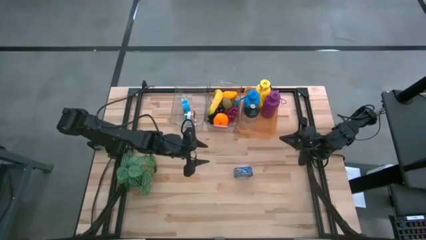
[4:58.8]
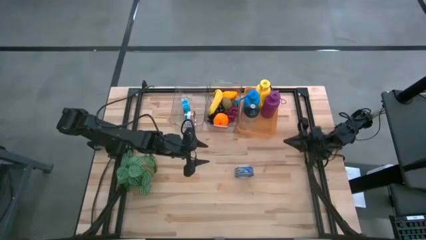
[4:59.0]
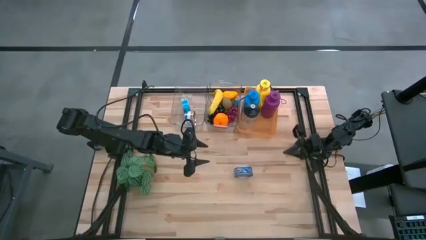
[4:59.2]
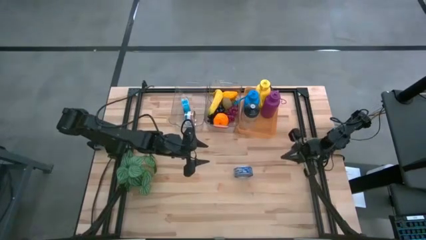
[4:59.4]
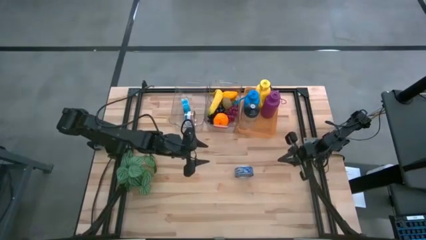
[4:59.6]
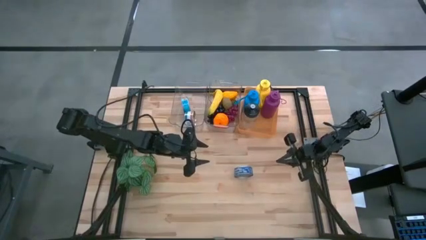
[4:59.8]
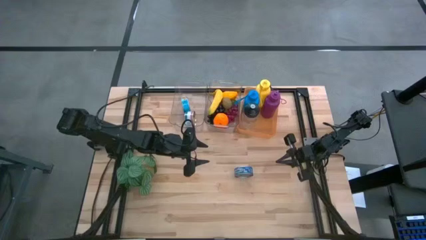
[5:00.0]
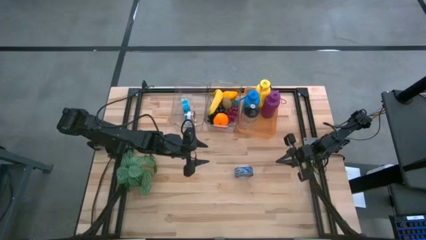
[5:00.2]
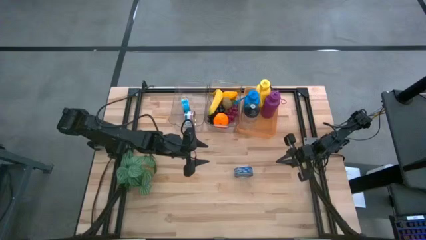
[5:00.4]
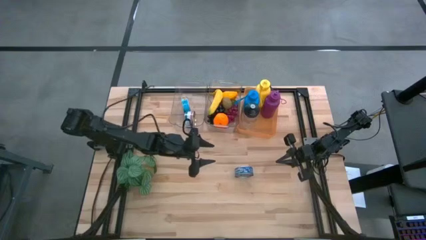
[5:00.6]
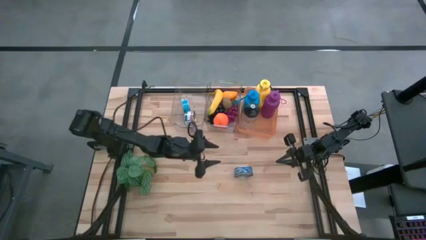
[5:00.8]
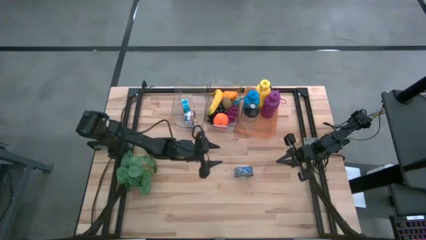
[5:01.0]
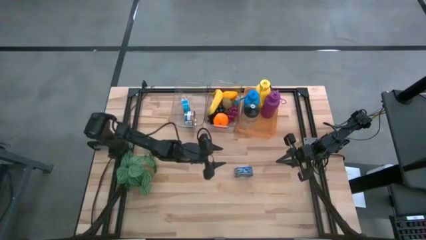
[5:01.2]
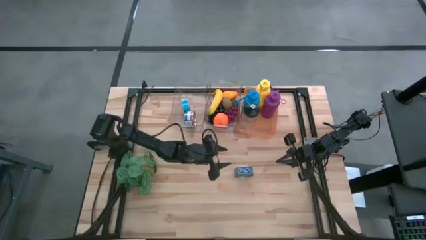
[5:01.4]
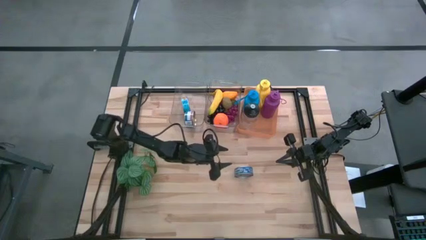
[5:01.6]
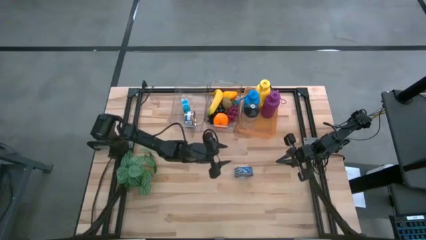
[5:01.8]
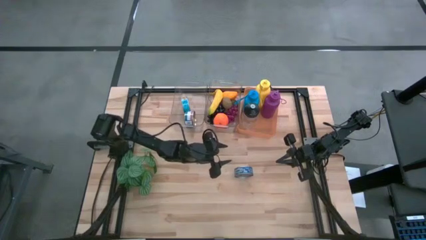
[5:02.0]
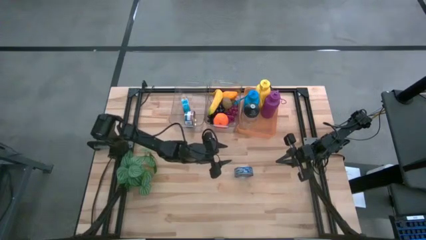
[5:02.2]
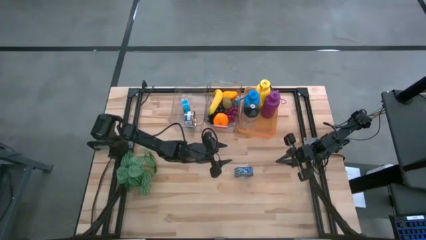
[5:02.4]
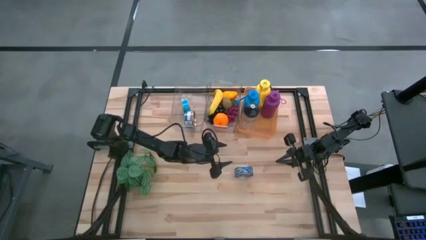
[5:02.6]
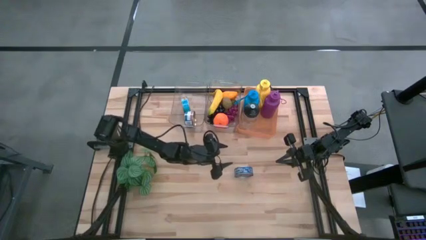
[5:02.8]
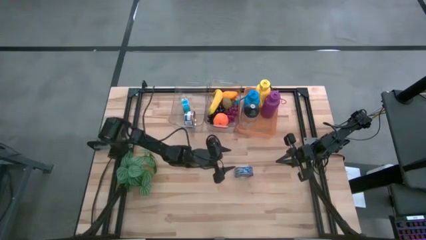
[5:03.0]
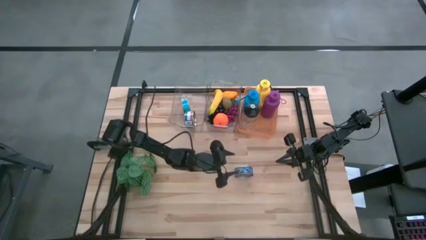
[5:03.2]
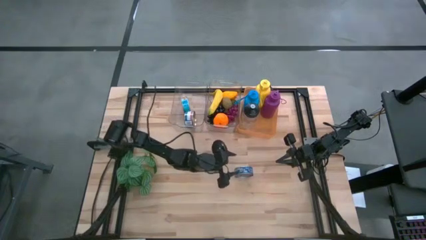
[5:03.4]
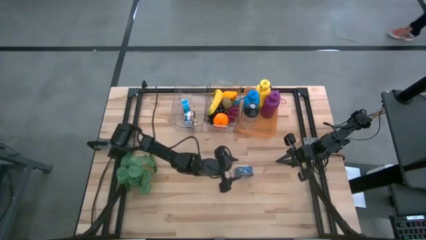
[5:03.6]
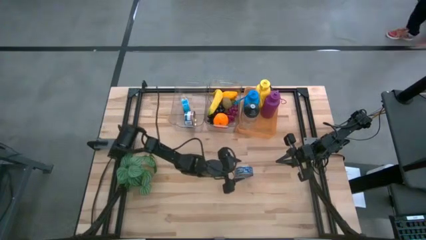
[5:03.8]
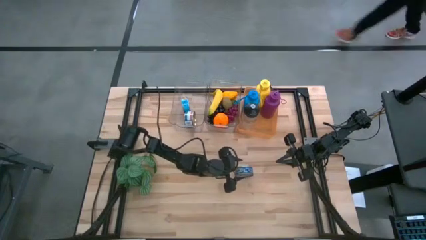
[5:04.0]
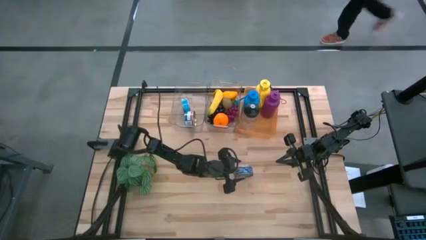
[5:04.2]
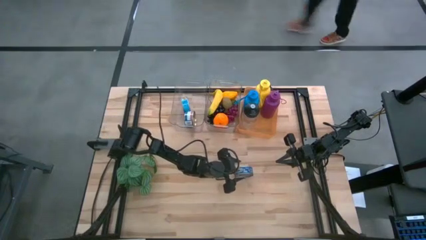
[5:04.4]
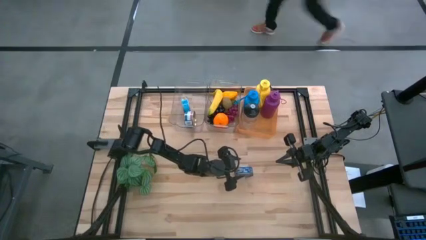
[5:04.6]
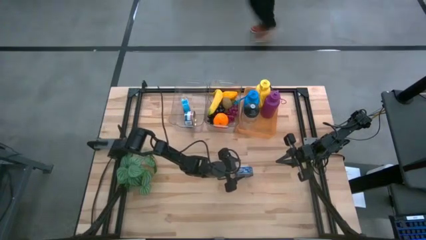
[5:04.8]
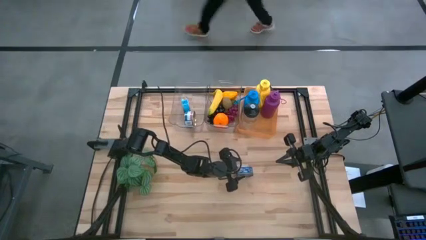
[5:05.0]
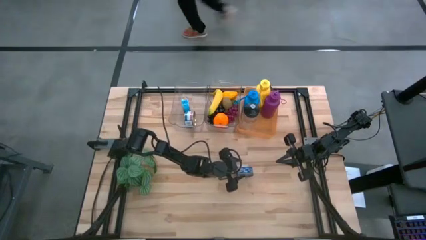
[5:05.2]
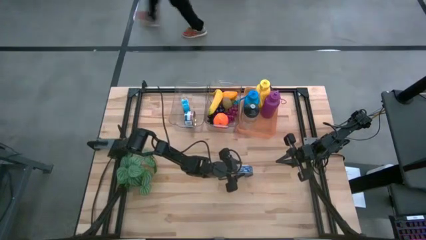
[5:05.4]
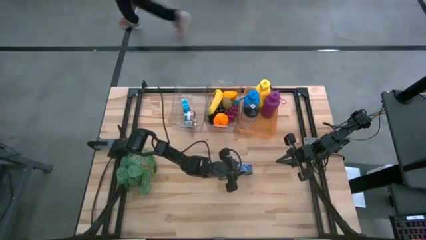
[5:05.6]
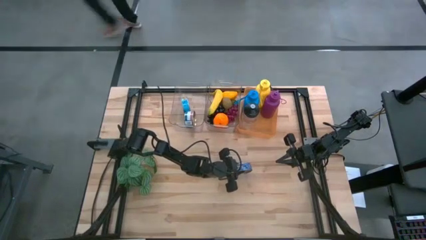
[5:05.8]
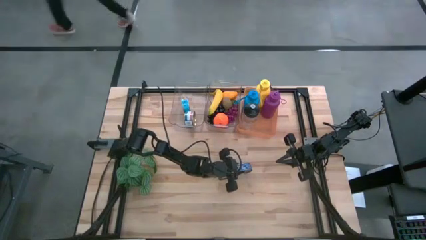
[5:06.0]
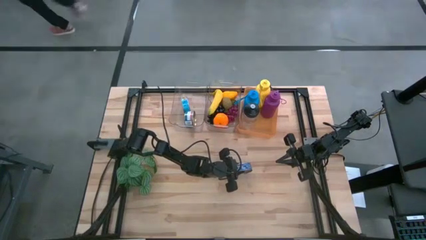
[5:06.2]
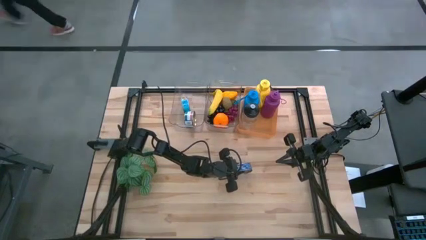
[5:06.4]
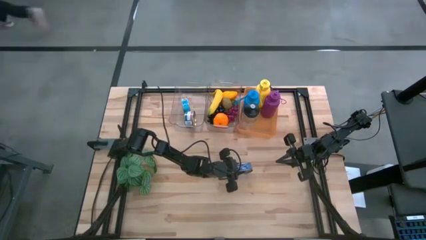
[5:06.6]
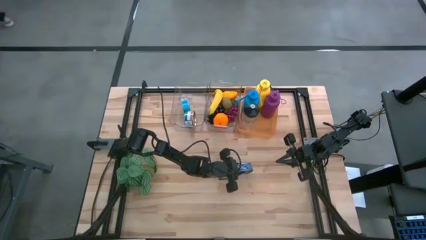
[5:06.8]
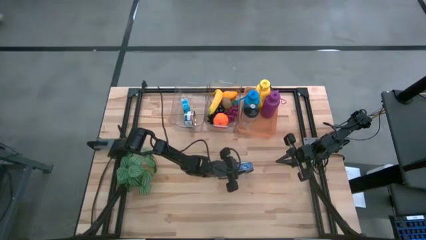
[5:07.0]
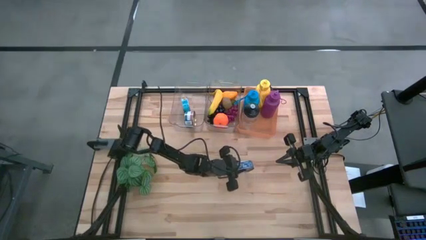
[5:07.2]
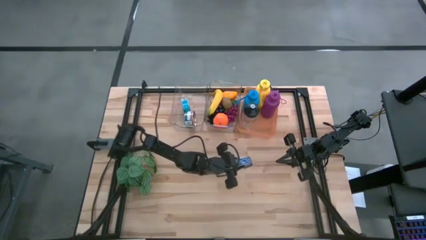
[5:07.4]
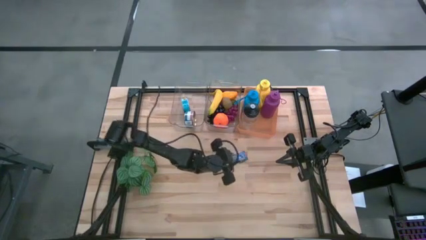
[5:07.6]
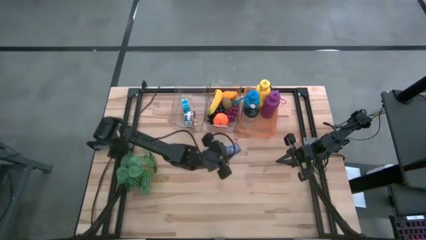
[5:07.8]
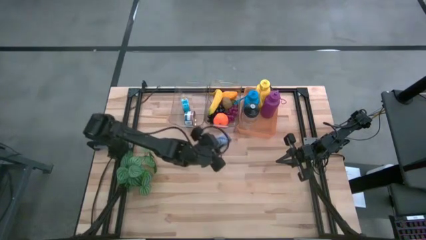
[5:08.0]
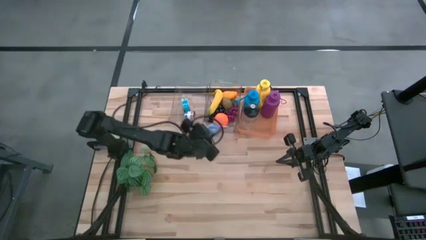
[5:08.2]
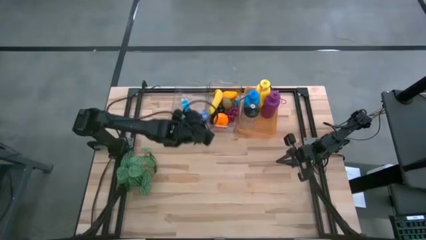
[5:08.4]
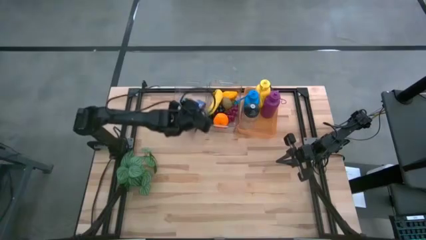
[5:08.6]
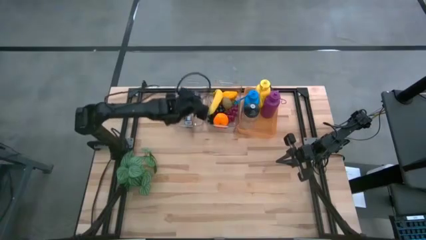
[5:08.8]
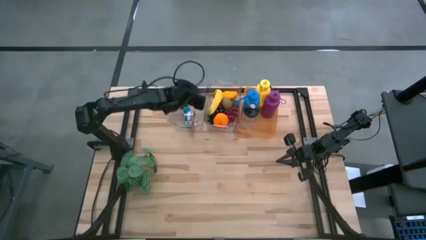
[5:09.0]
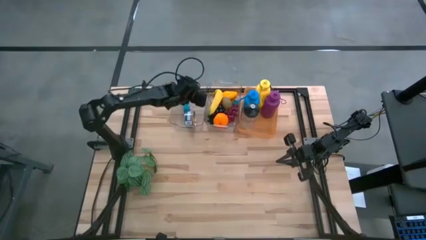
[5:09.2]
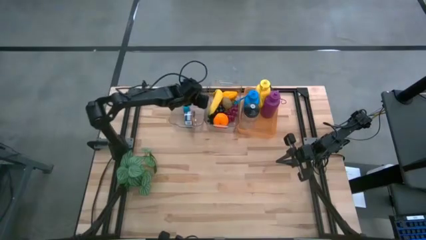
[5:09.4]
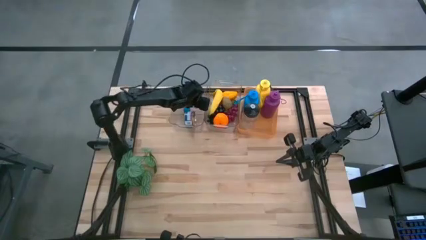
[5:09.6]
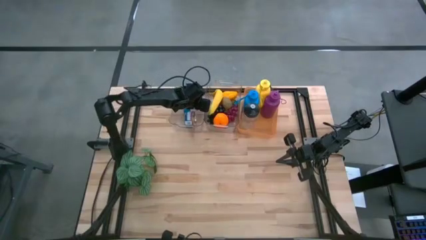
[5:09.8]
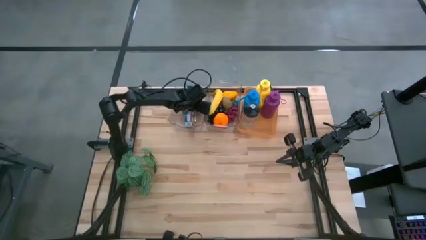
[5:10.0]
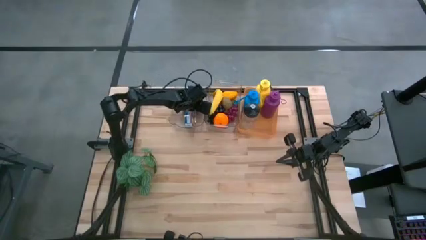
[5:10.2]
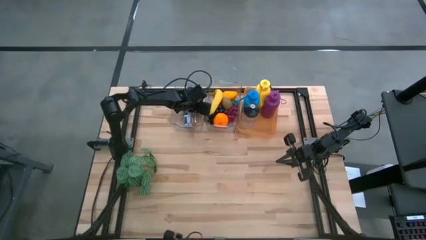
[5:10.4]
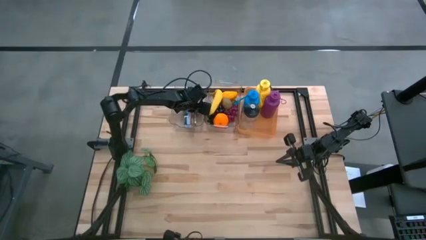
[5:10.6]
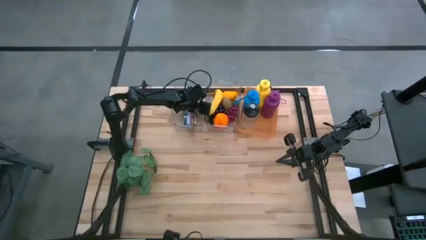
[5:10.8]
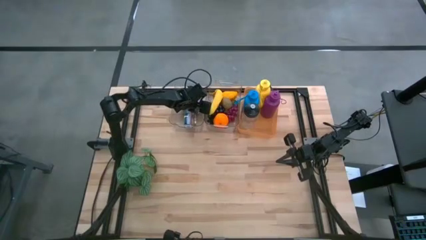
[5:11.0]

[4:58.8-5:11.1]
Task: Pick & Place Food Item
Put the blue tuna can into the left transparent bin
